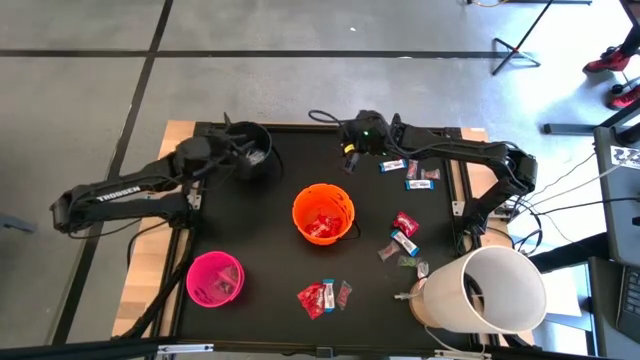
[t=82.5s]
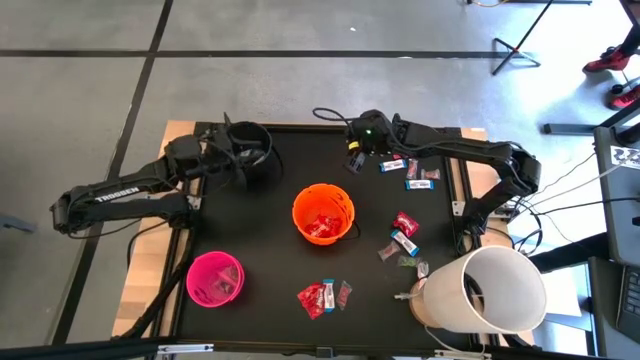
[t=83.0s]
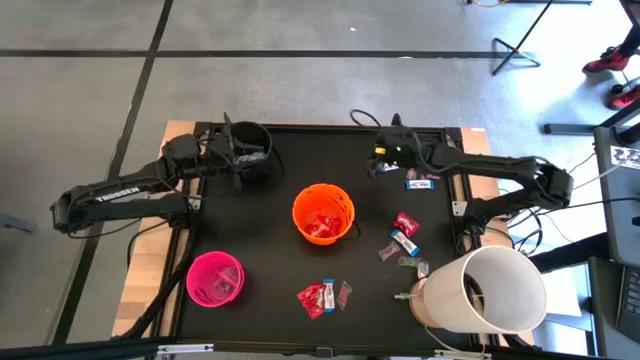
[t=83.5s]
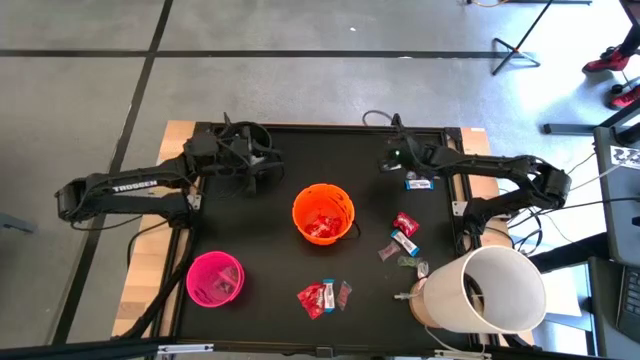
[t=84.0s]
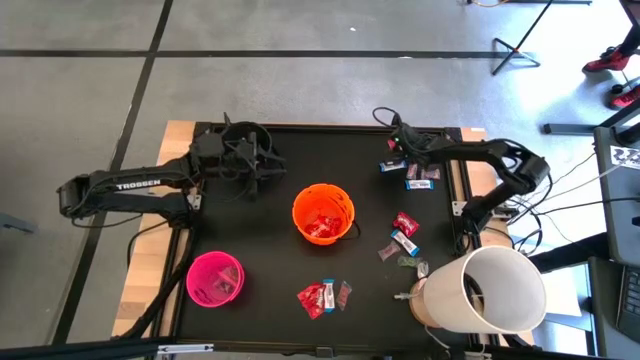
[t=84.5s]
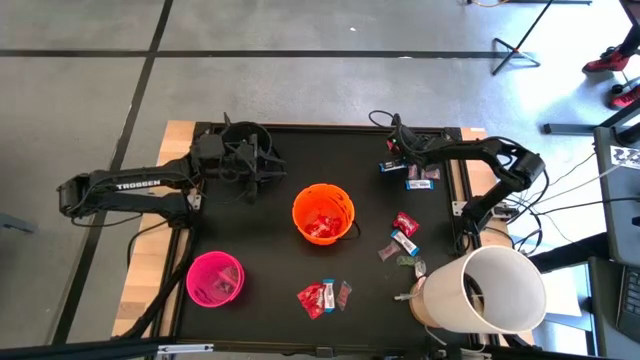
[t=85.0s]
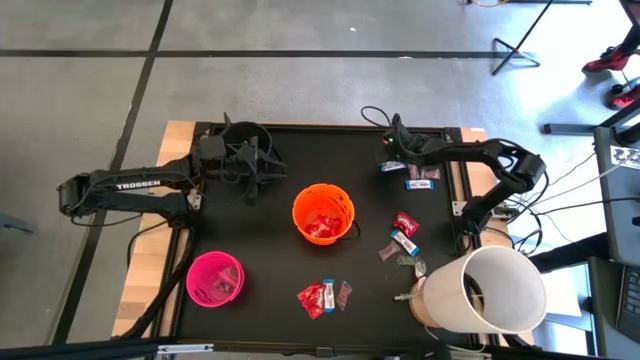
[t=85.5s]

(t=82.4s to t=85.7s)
Task: Sort candy
Put the red candy into the orange bucket

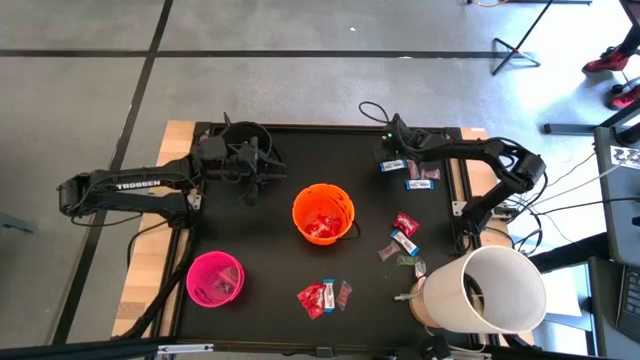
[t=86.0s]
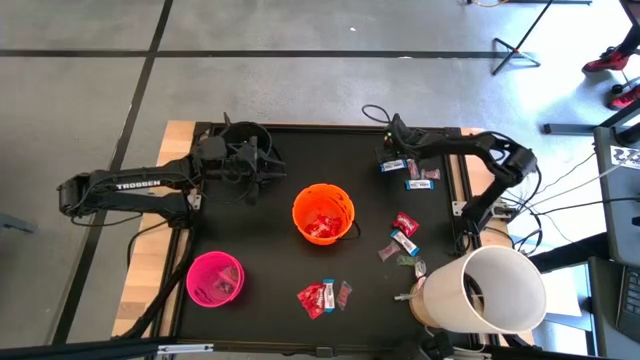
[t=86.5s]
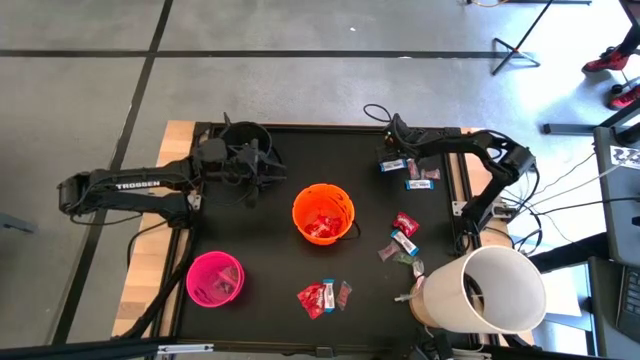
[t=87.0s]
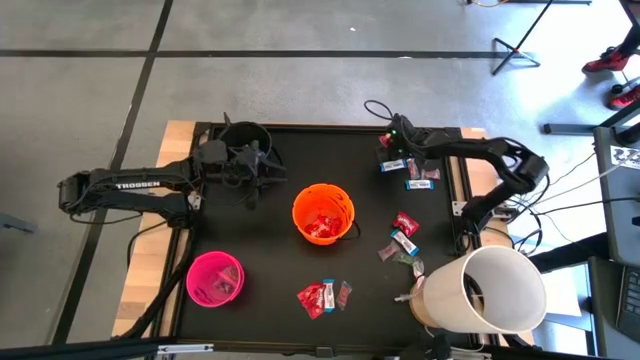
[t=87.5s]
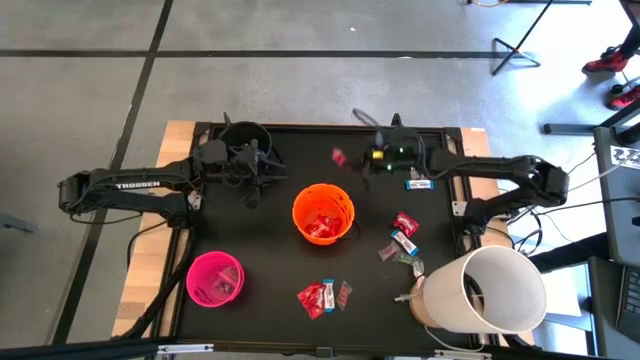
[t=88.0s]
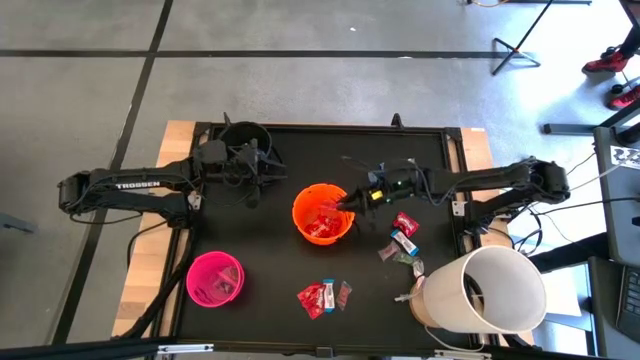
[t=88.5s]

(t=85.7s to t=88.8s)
Put the red candy into the orange bucket

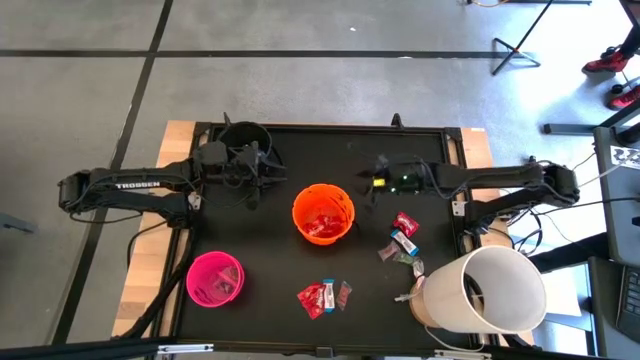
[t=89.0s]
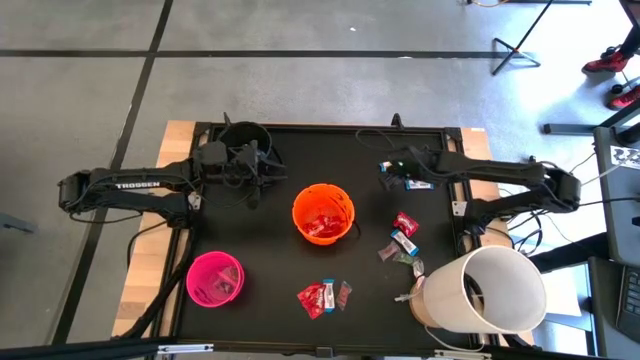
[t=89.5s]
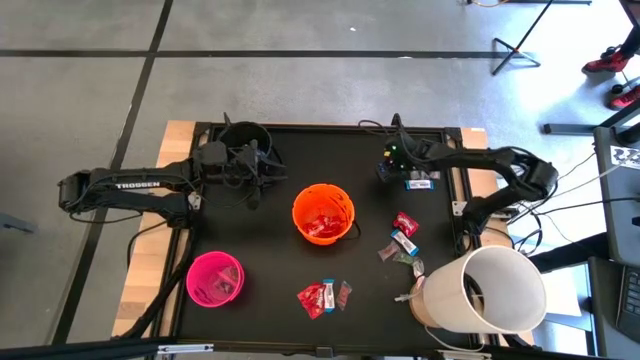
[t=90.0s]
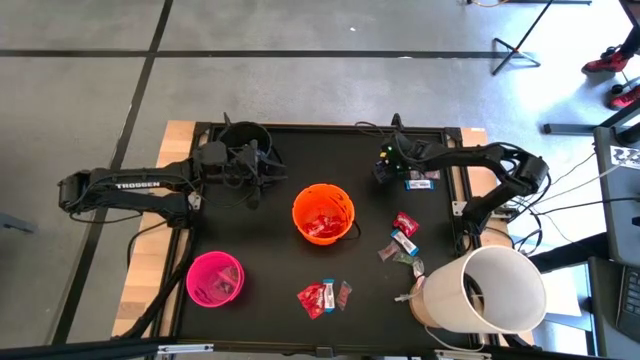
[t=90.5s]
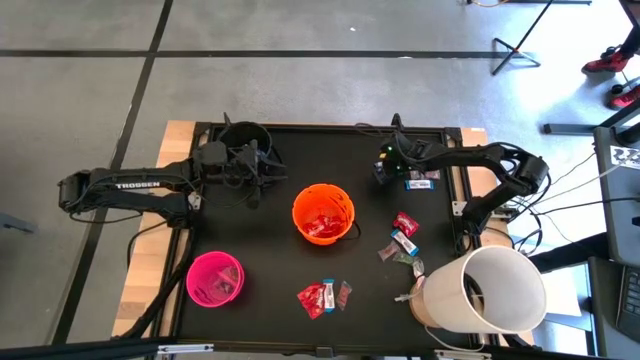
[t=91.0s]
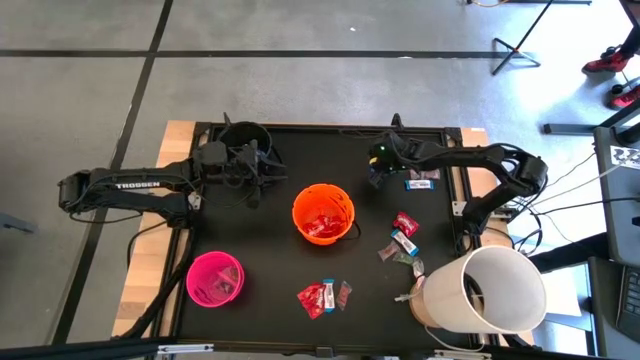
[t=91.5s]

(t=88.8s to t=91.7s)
Put the white chocolate into the black bucket

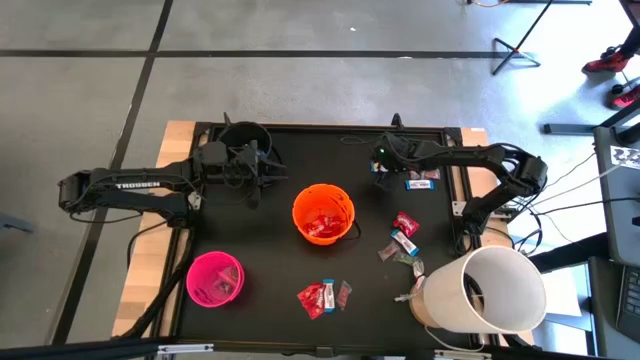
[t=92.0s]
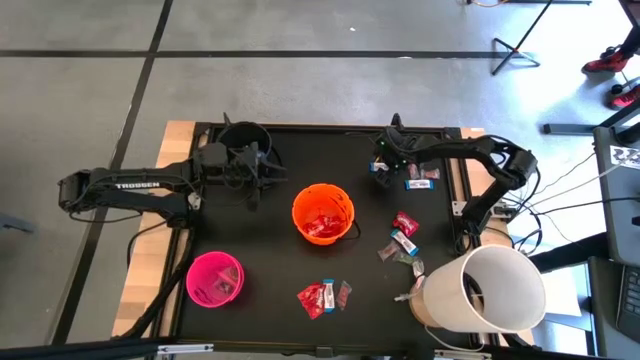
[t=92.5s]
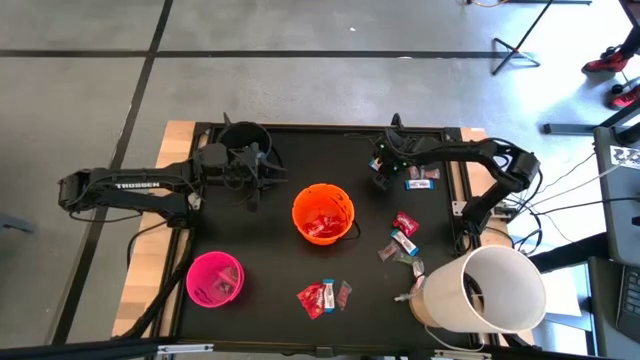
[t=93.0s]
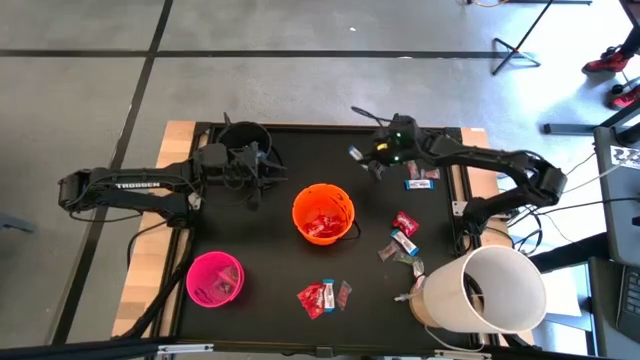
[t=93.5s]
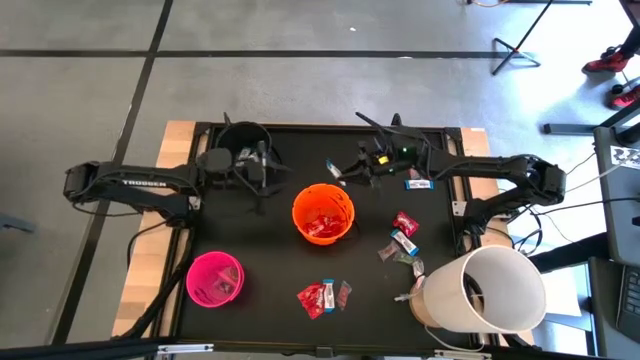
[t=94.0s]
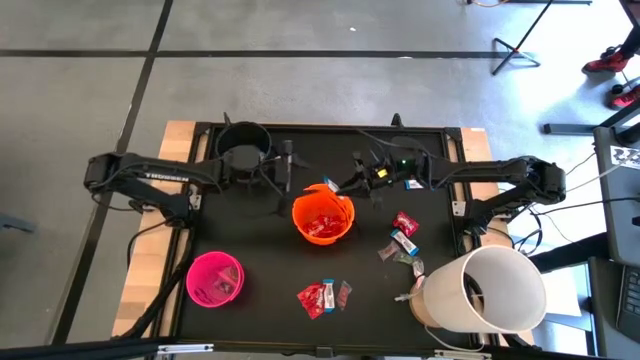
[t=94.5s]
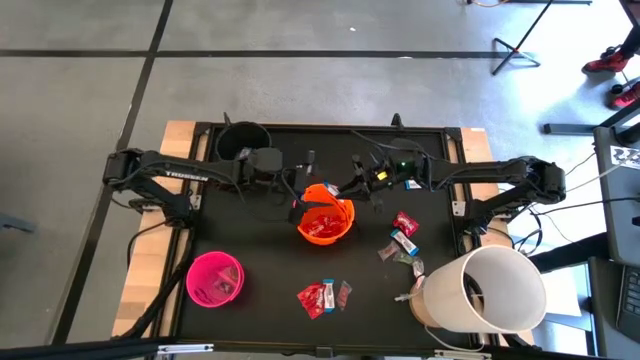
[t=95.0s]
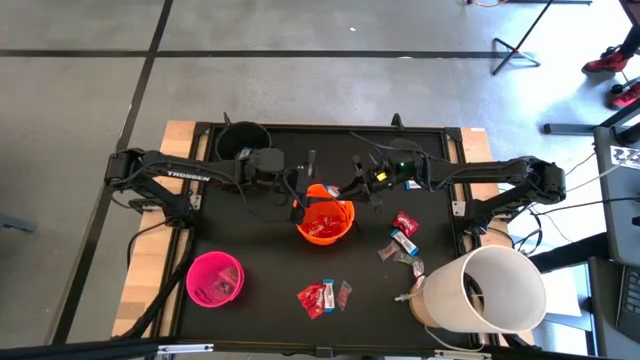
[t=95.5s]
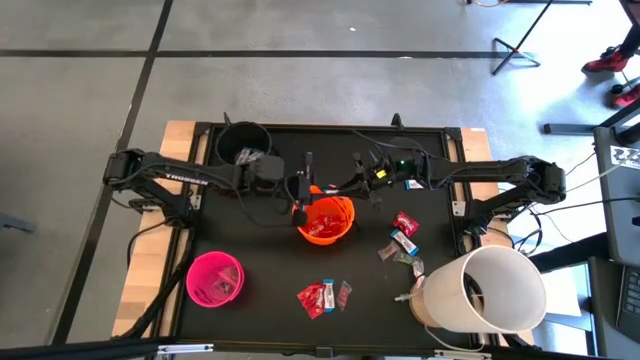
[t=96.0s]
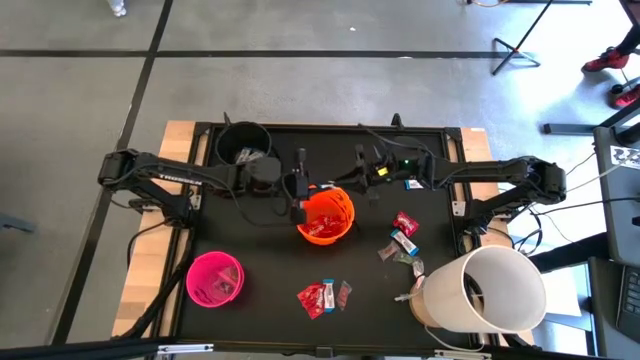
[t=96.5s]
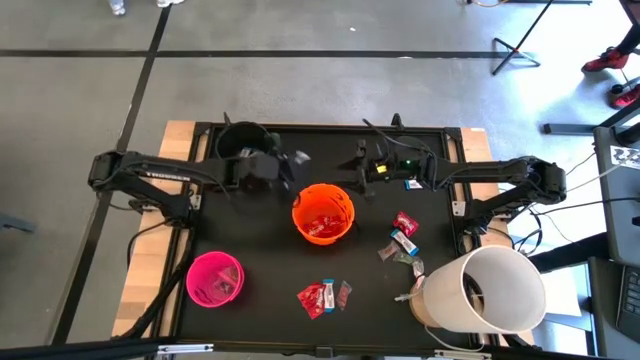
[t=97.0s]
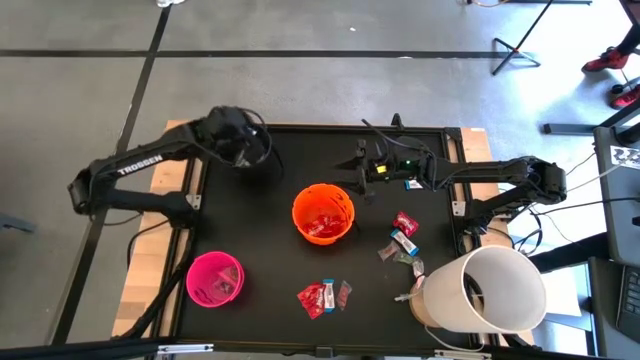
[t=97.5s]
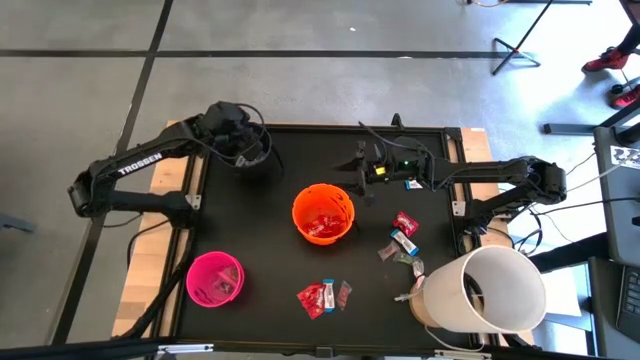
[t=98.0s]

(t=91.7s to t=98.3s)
Put the white chocolate into the black bucket

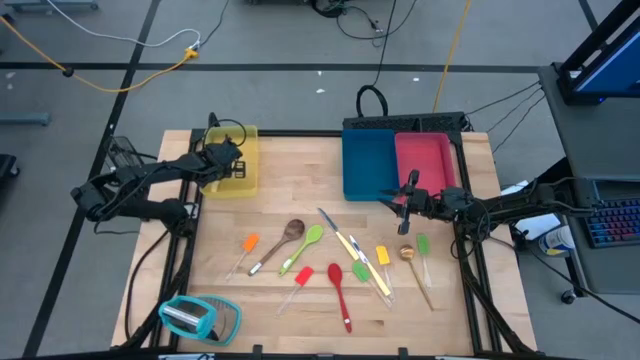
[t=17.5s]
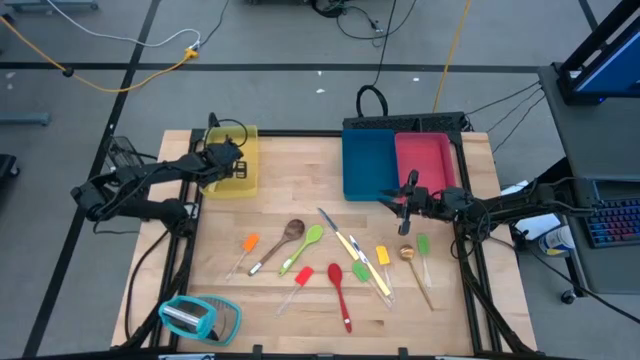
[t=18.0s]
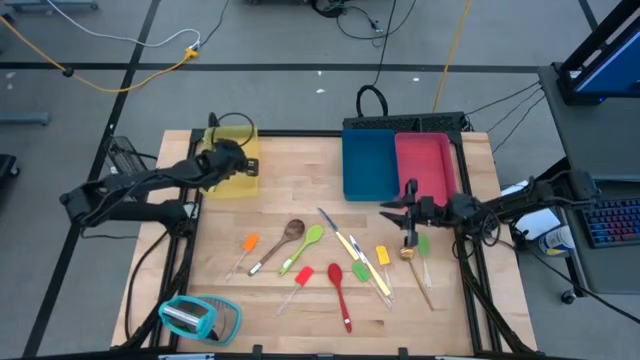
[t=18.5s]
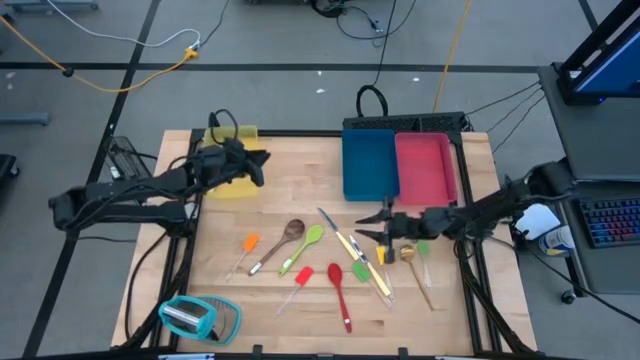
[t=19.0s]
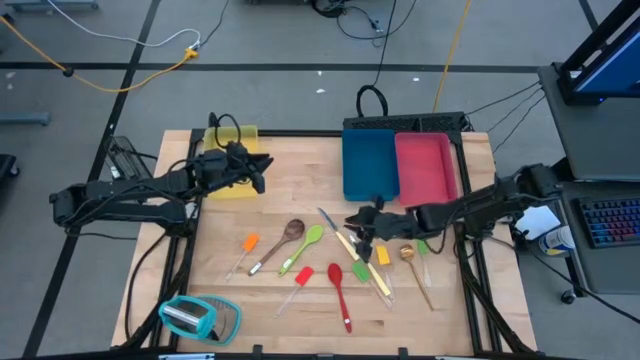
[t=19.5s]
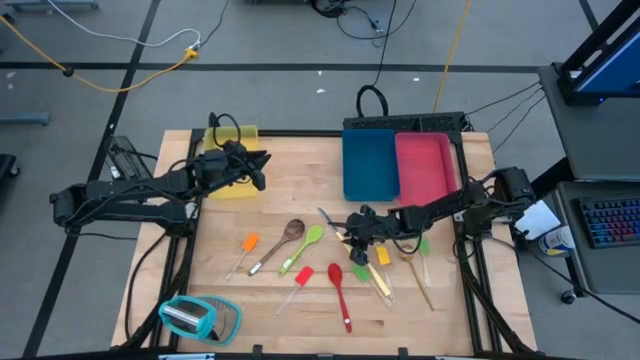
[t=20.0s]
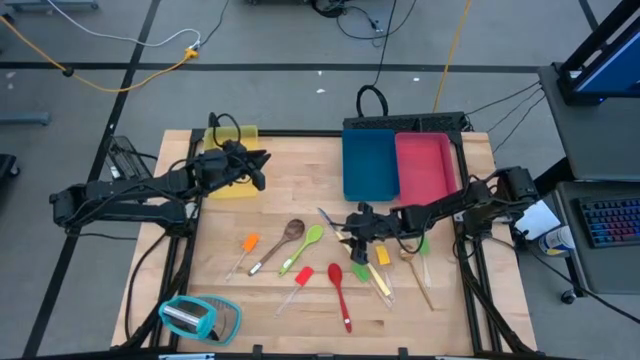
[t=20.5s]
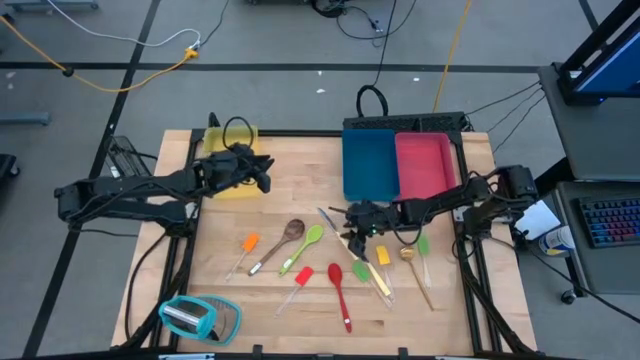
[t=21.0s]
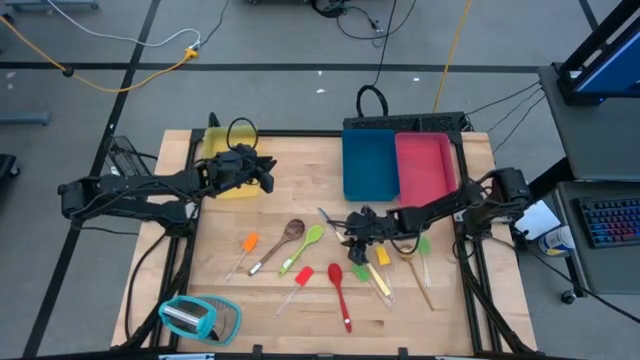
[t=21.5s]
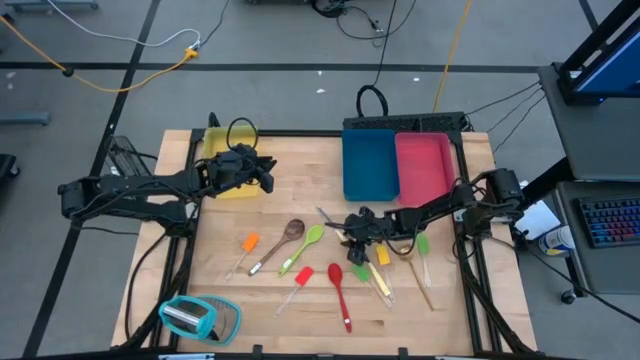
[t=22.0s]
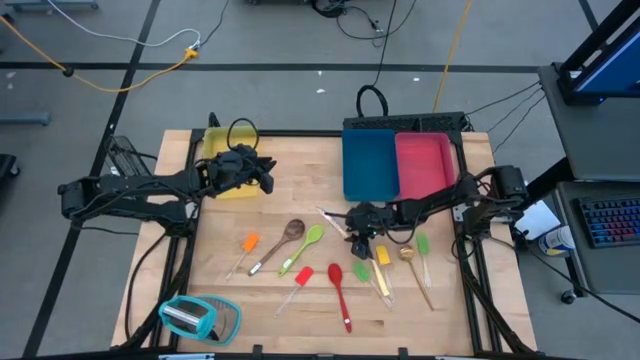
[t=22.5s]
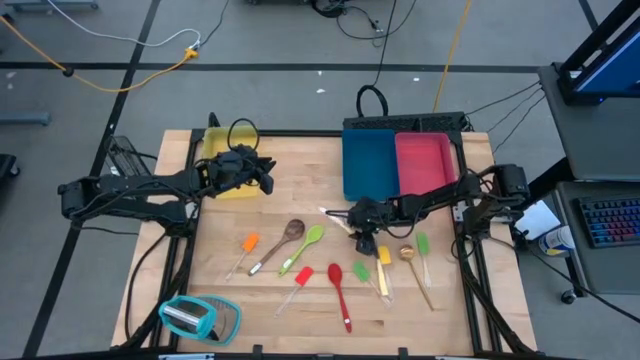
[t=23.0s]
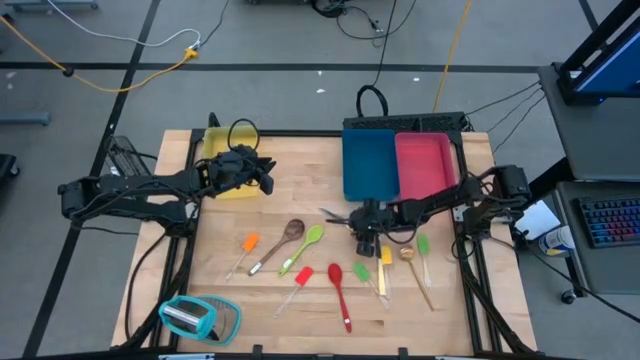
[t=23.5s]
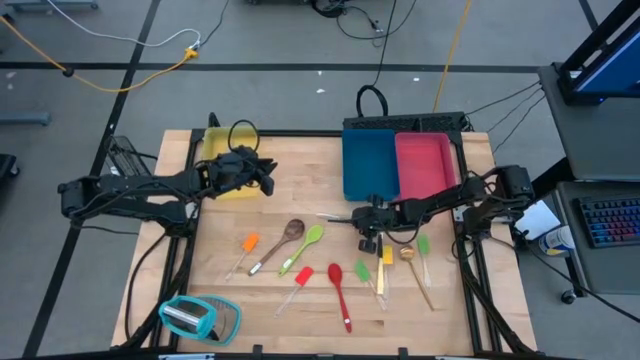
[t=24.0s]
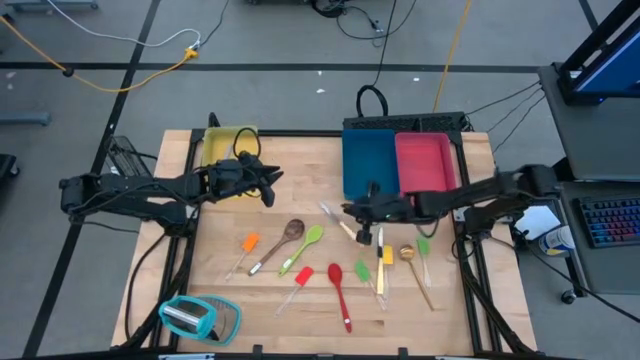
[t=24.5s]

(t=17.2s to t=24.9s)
Task: Pick & Place Kitchen Items
Put the yellow knife into the yellow bin
